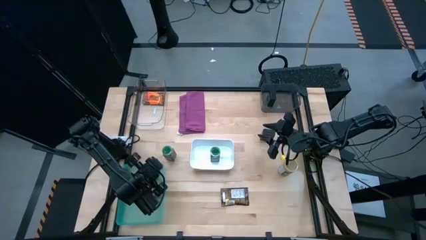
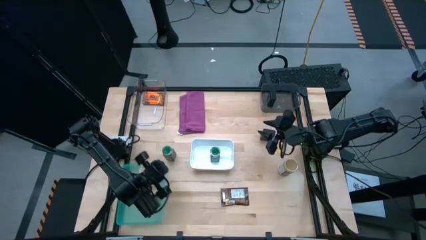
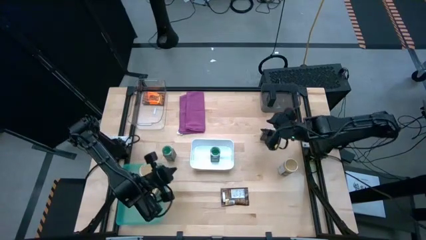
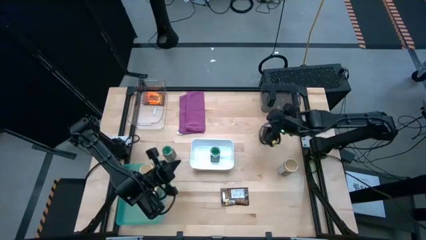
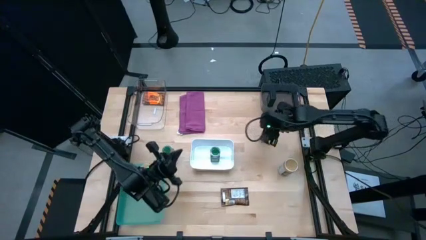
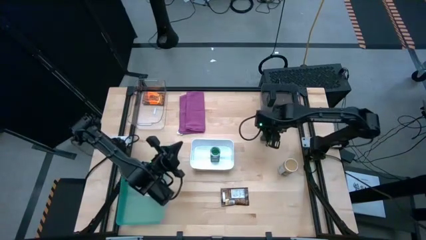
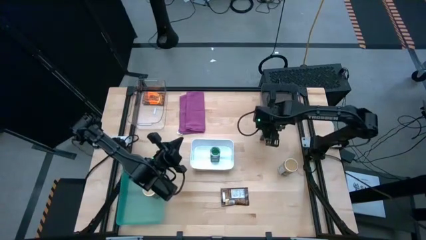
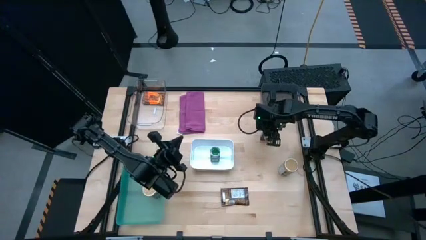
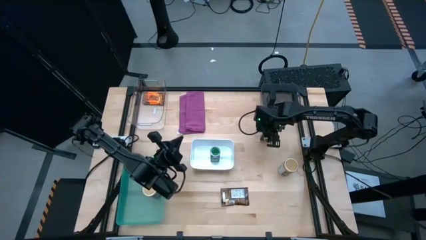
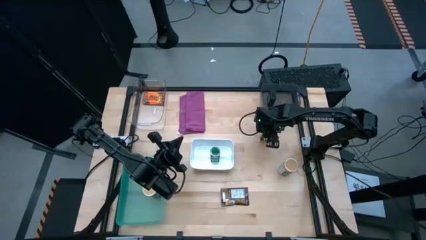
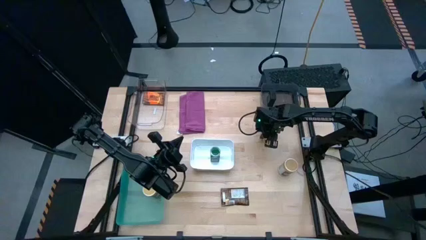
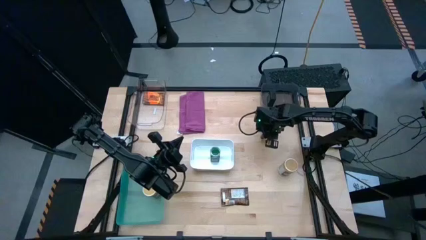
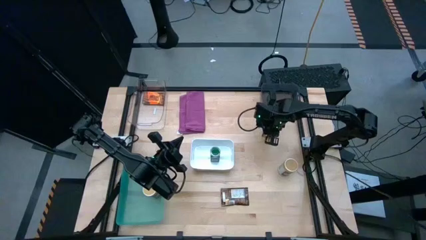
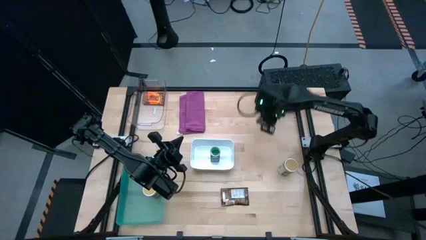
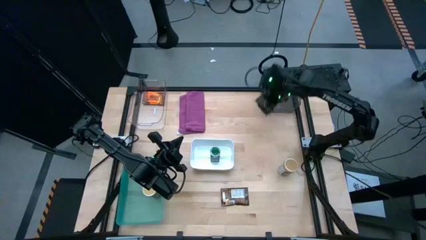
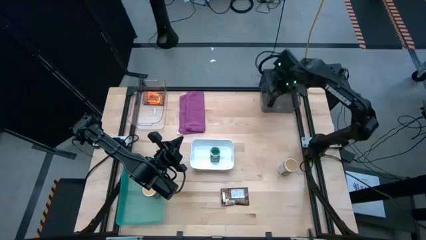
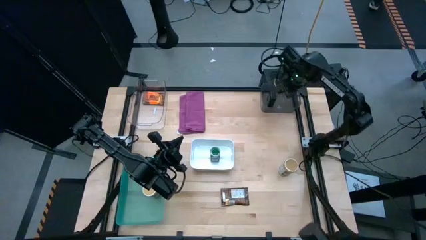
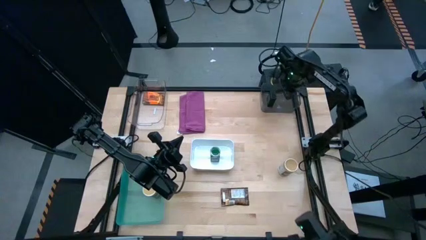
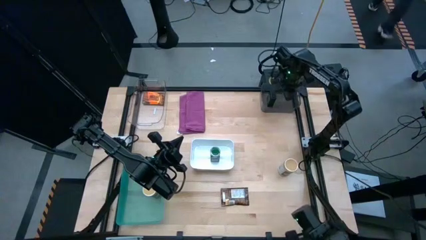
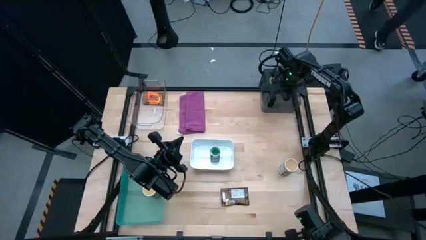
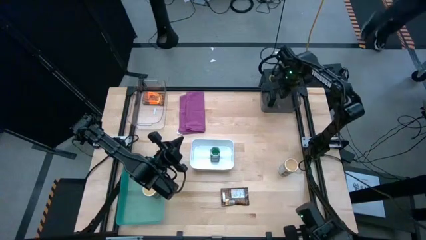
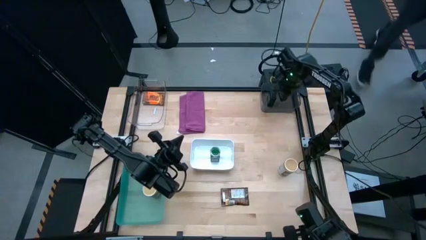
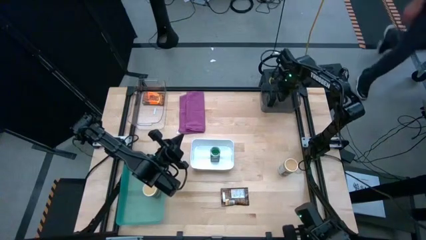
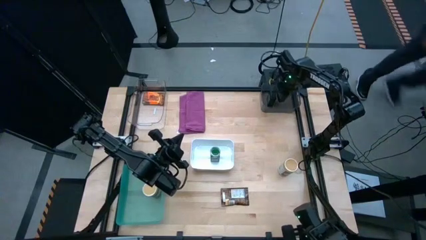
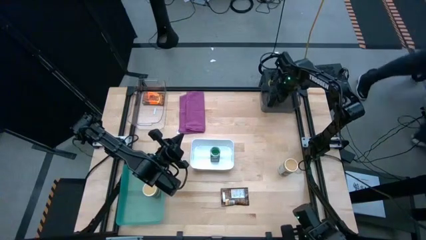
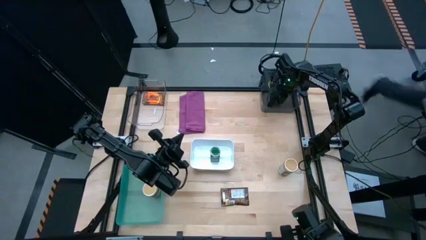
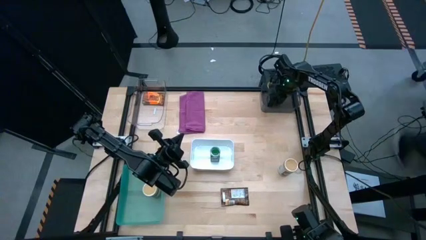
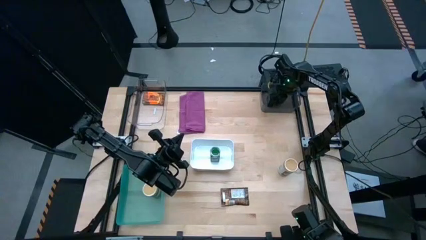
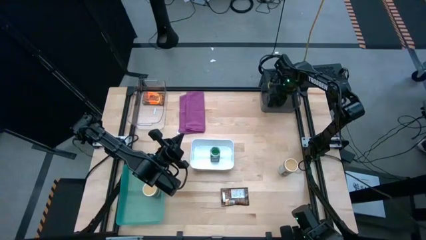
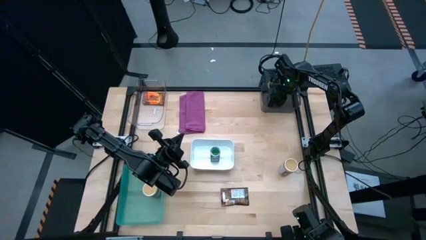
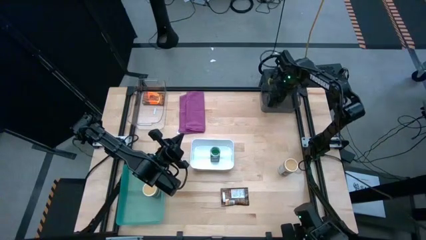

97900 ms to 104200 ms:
Task: Sort spices by type
Put the black seasoning can into the black bin

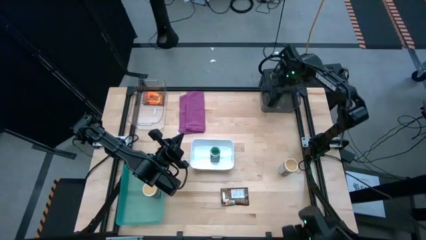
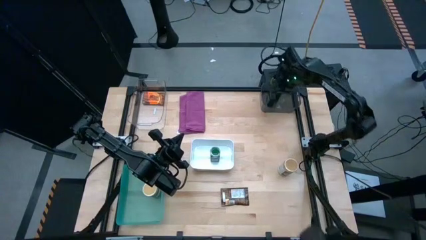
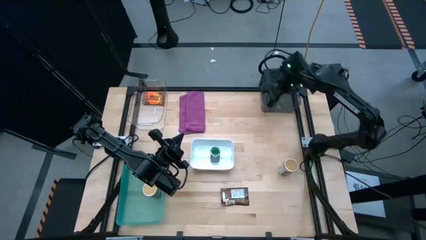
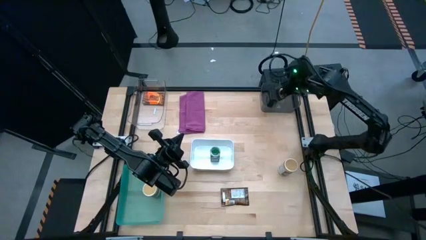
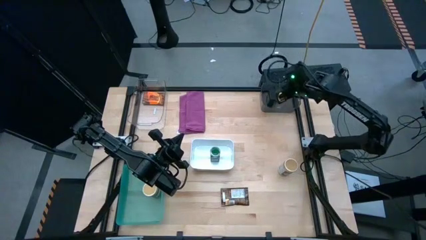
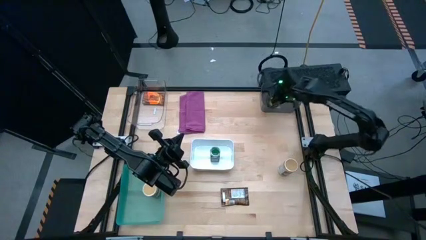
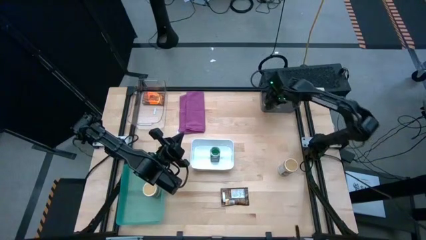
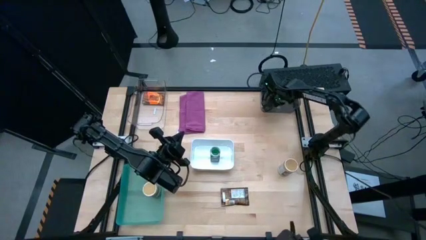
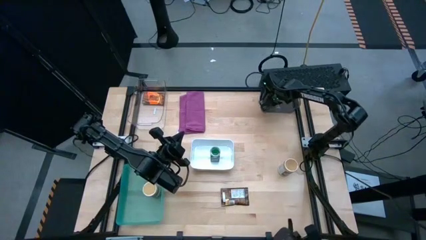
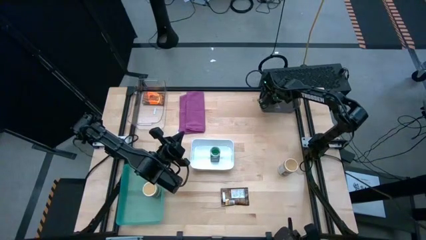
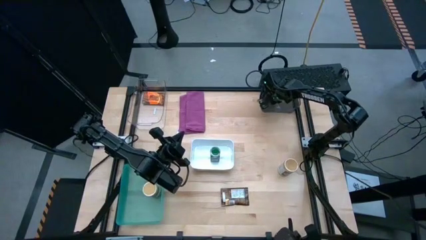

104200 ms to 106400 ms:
Adjust left black seasoning can in the black bin

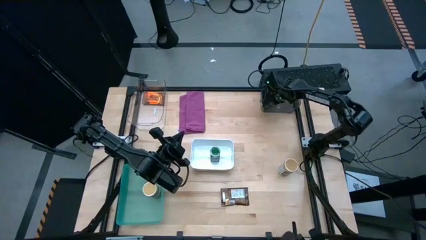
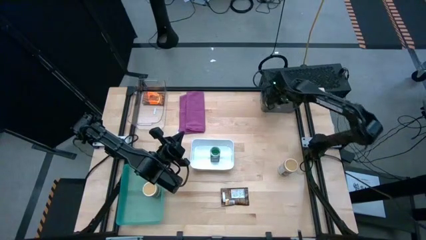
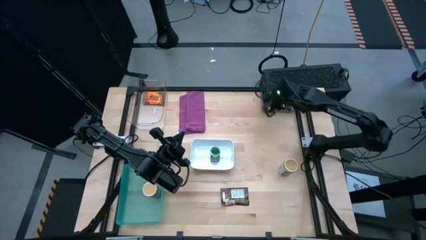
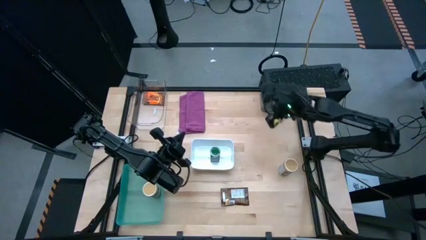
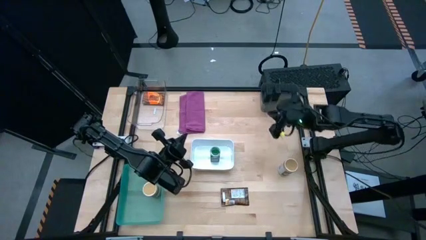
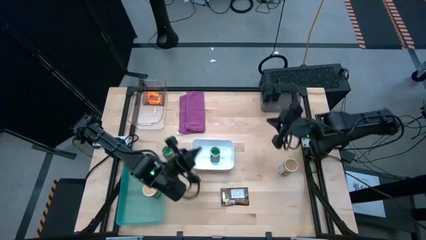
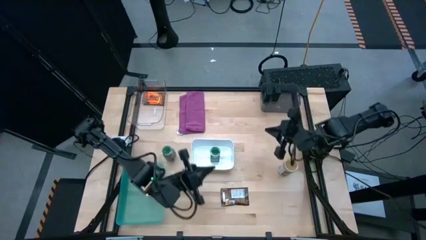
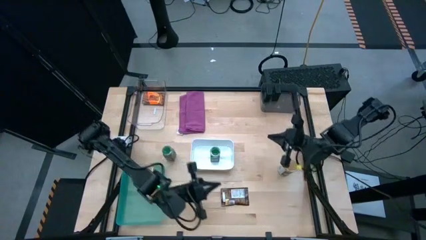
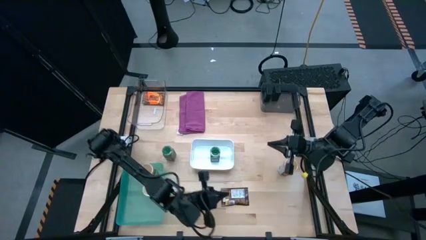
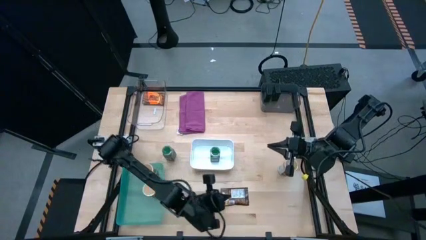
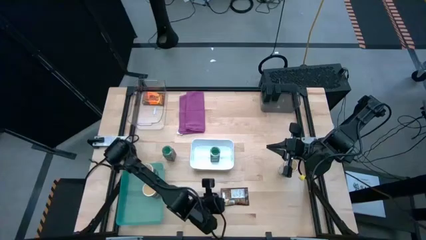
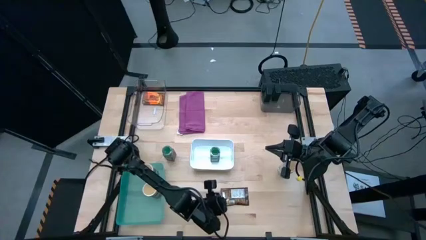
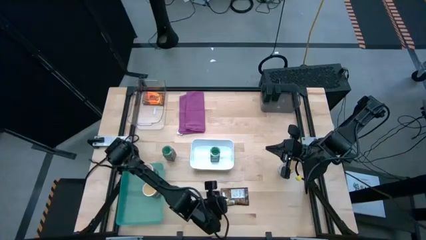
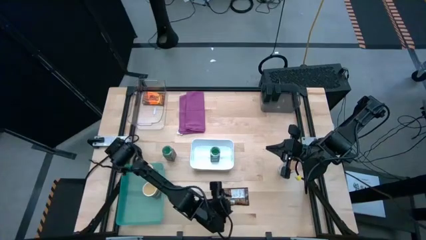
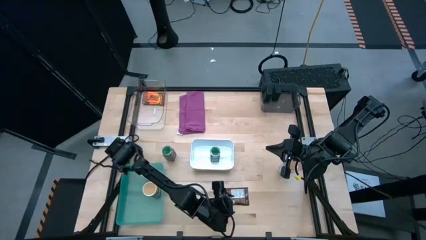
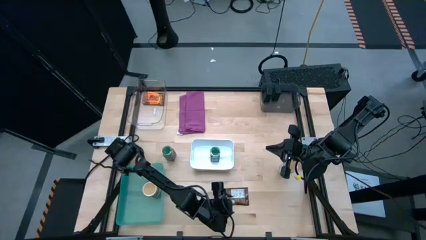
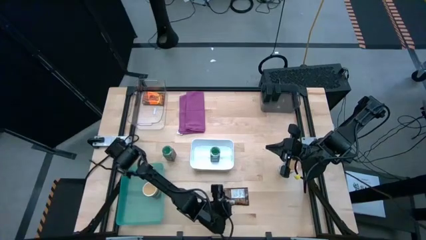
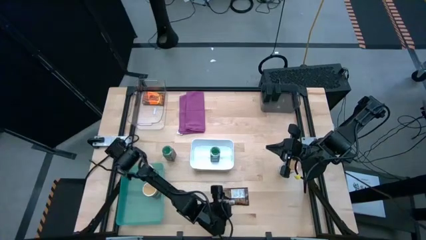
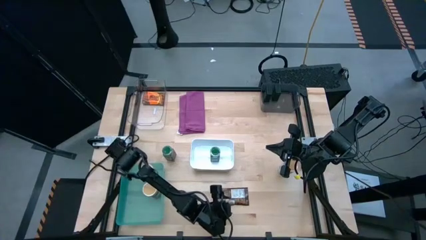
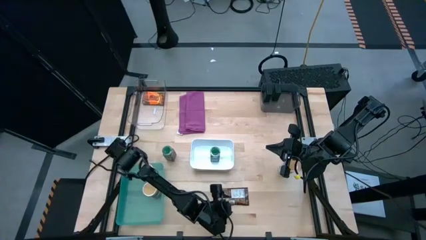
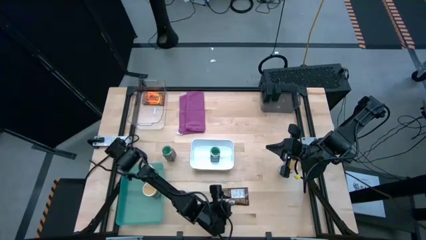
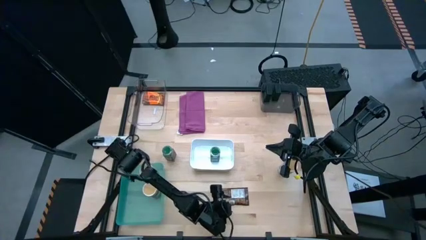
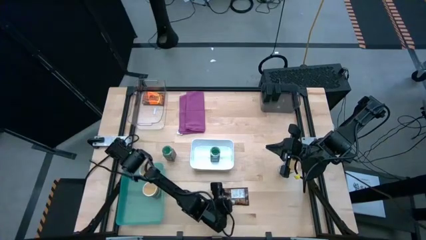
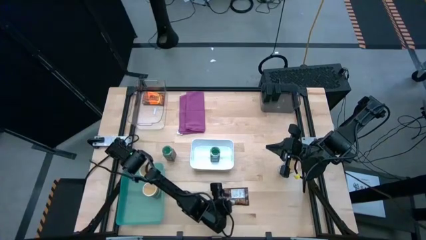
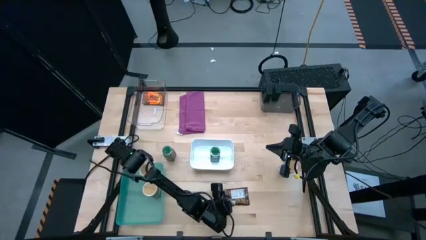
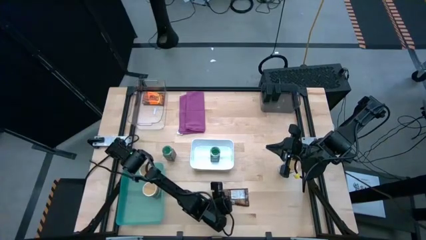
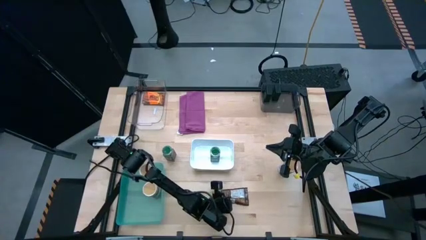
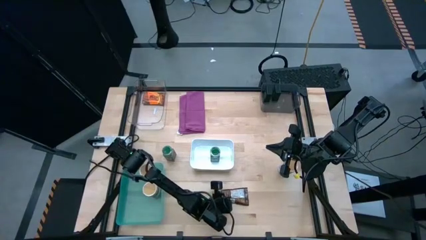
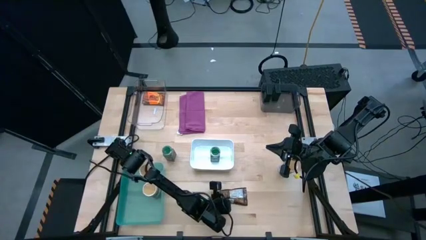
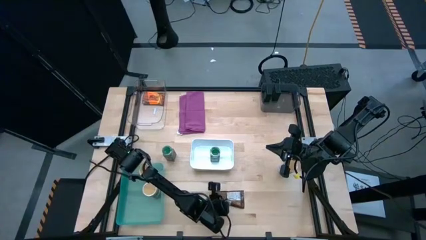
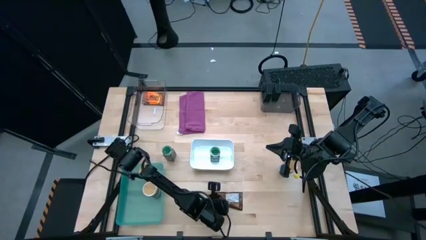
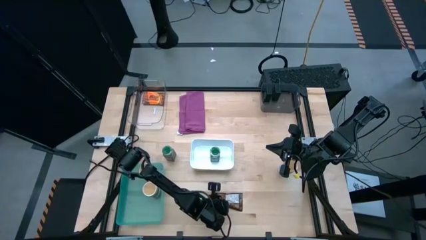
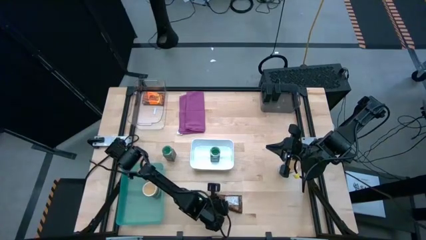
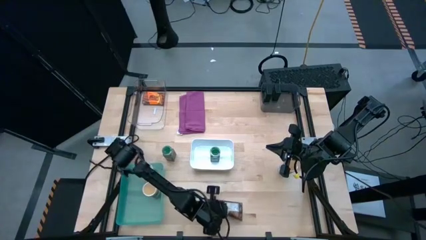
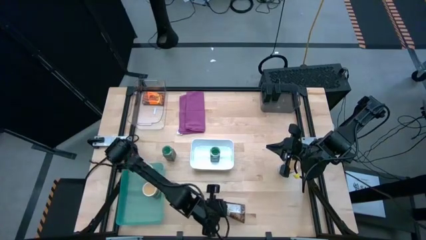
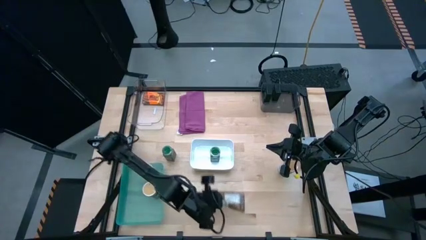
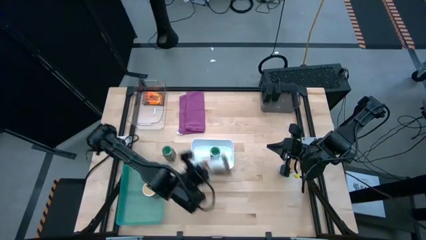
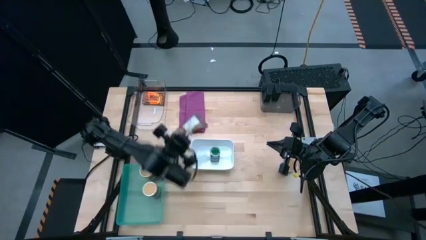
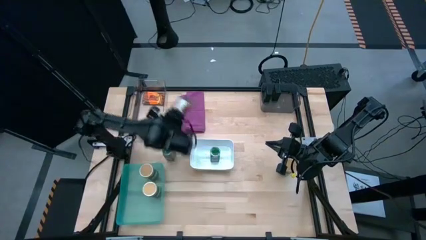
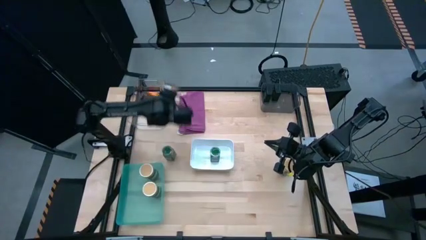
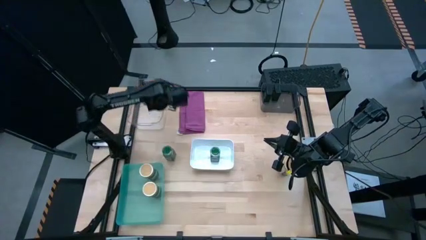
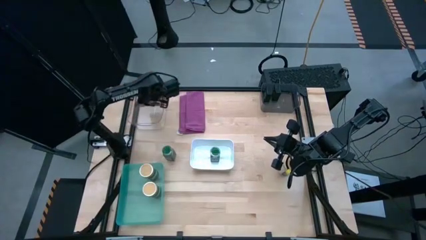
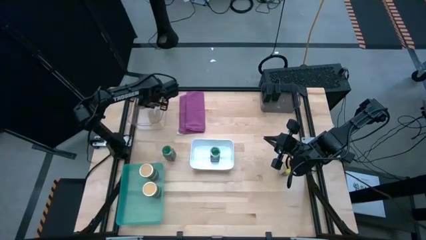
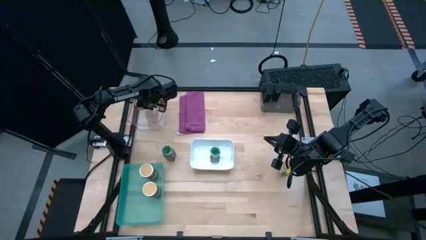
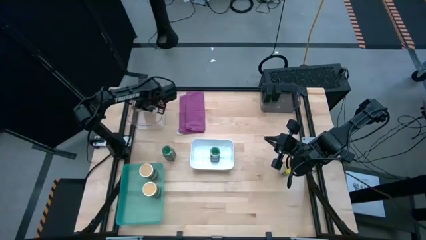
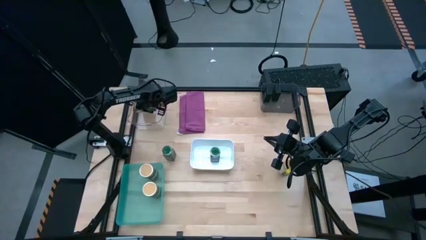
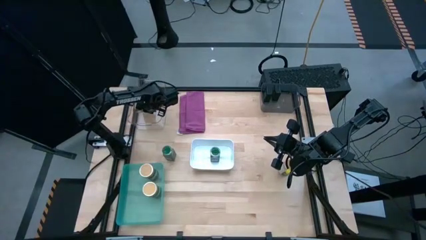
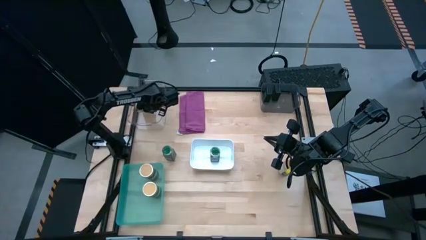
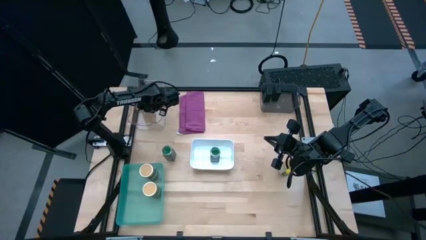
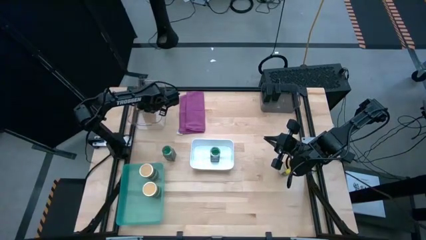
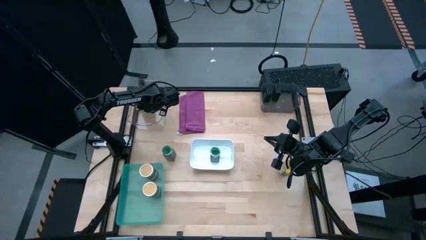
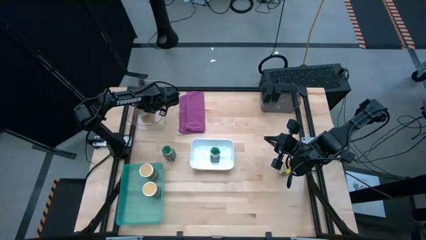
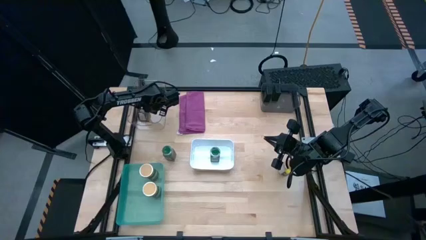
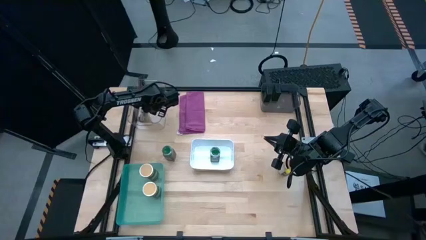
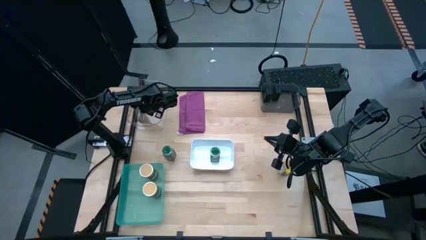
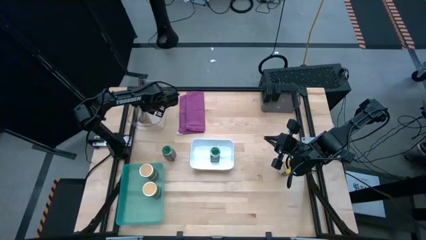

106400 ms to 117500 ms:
Put the orange seasoning bag into the transparent bin
